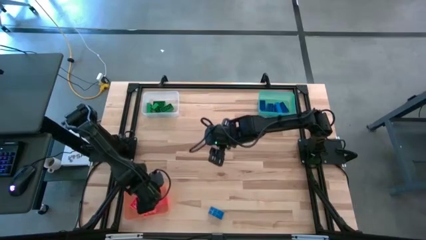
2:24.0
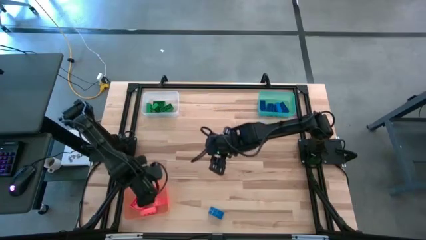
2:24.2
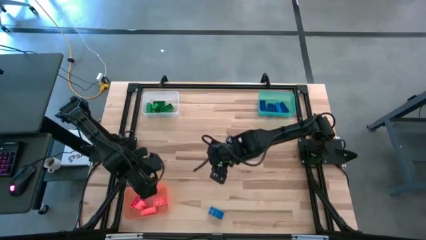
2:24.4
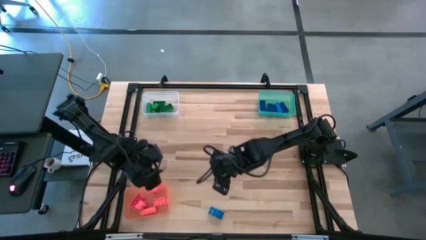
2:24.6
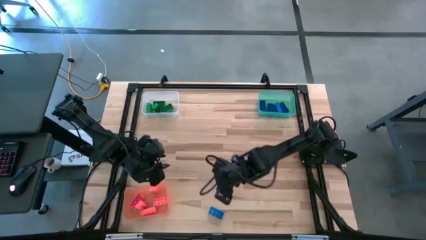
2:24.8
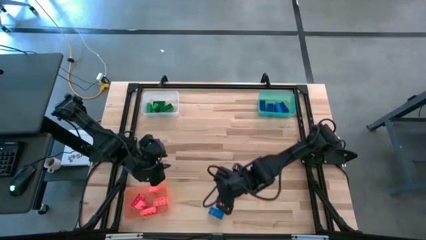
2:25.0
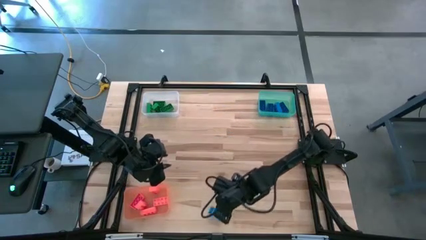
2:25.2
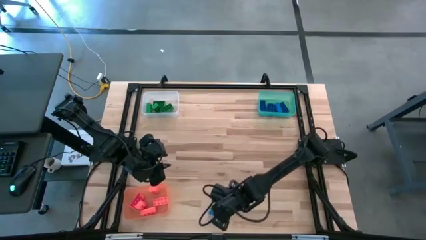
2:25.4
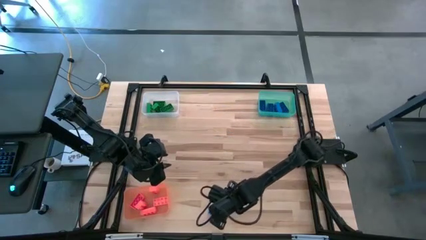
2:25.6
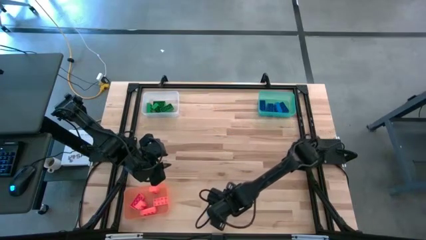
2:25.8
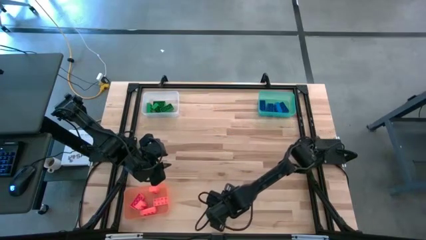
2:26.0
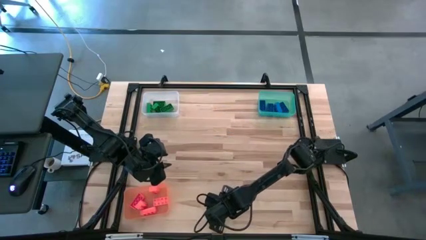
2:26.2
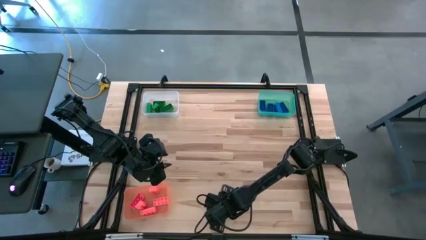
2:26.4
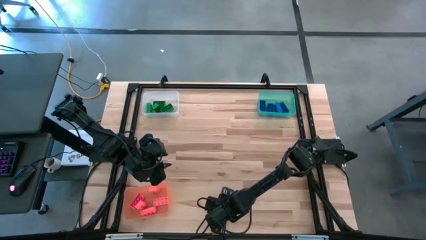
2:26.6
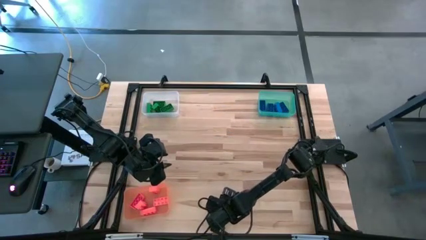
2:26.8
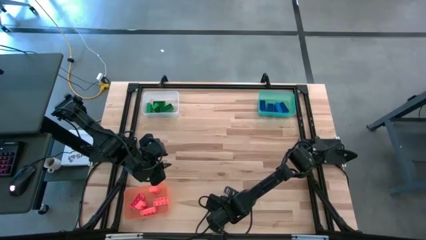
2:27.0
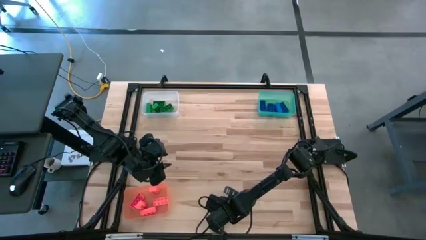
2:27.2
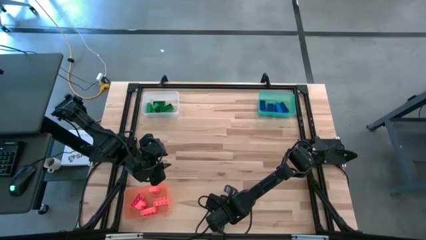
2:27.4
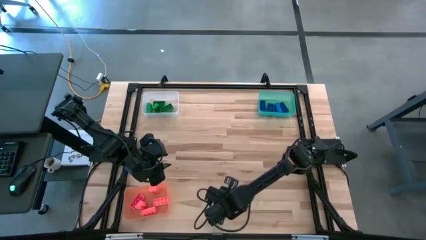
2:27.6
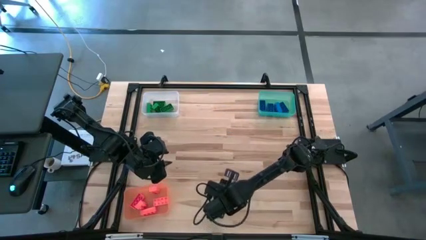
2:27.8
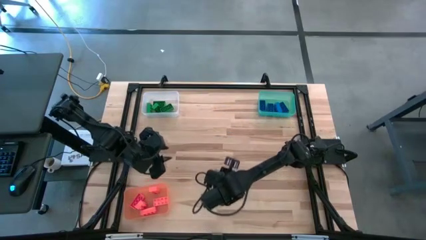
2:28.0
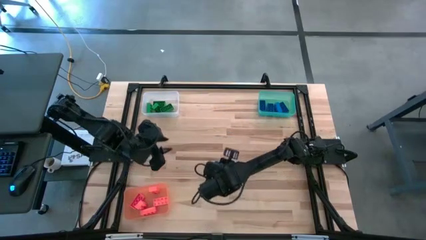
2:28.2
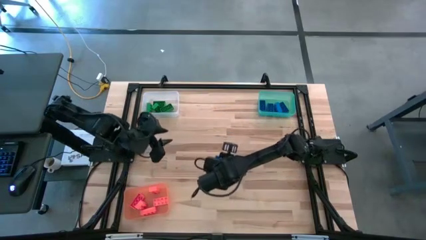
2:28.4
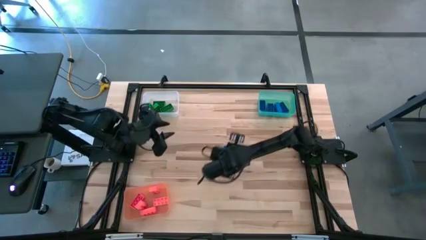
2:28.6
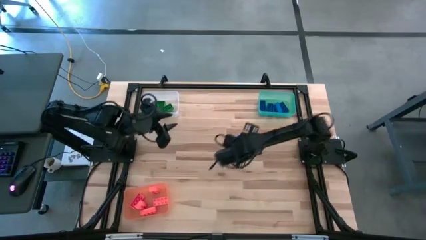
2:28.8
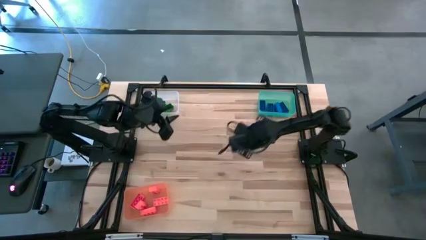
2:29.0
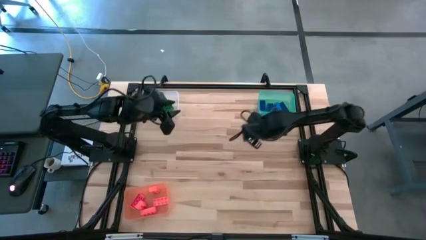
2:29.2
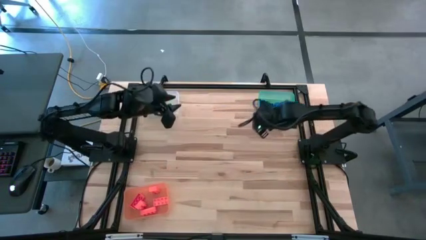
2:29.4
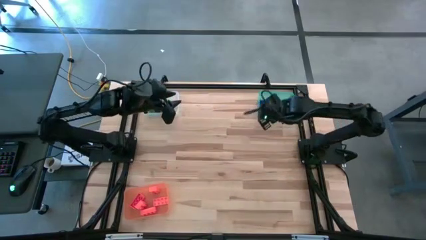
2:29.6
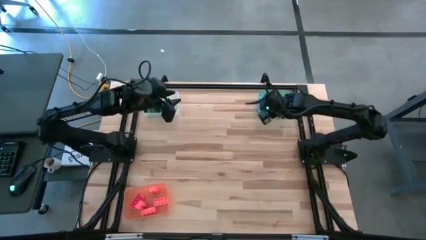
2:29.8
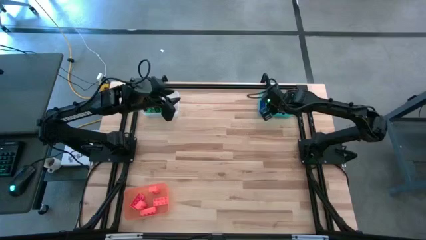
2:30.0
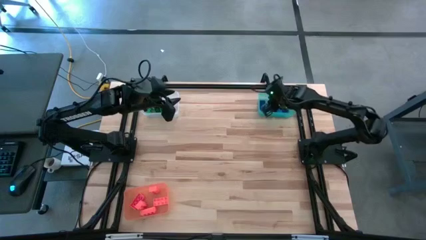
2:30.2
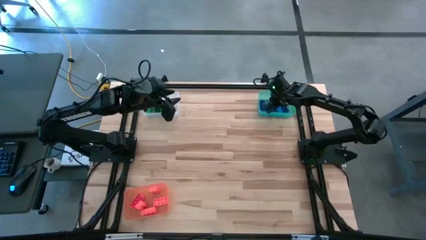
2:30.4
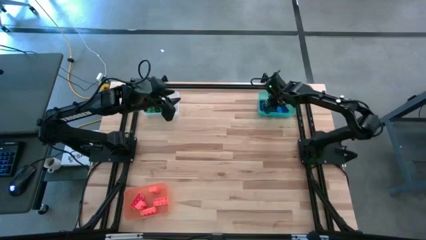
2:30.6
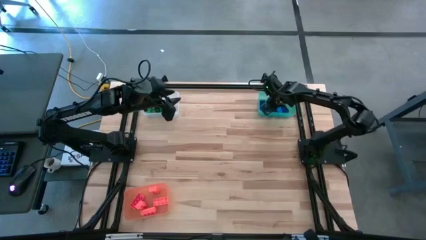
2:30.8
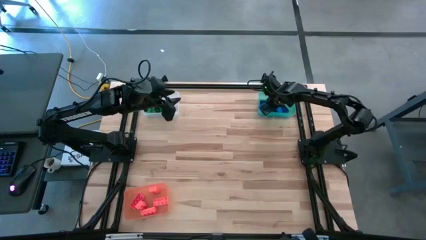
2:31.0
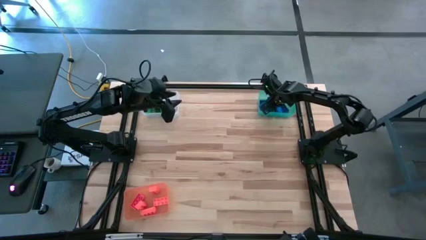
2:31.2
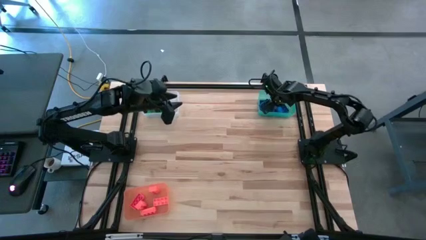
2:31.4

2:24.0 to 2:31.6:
Task: Sort & place blocks by color
Put the blue game piece into the green bin

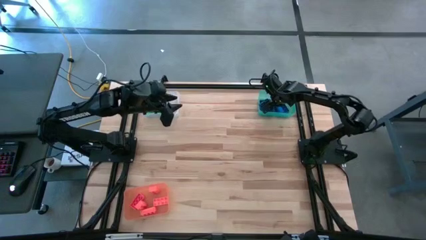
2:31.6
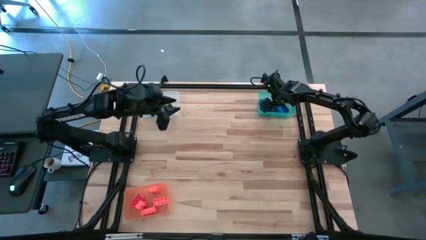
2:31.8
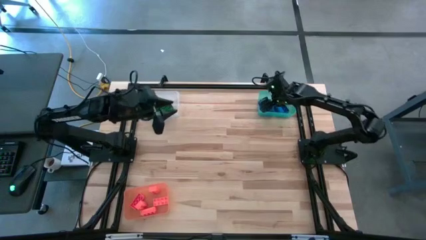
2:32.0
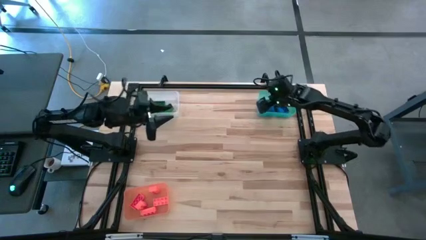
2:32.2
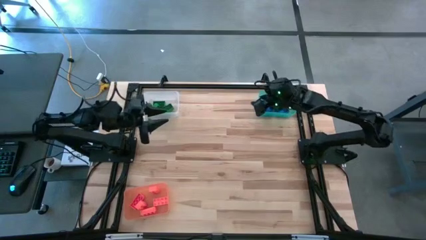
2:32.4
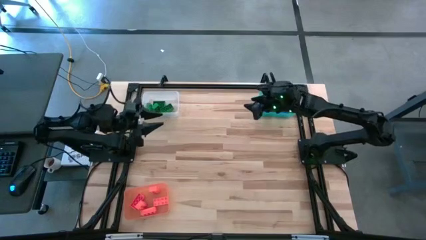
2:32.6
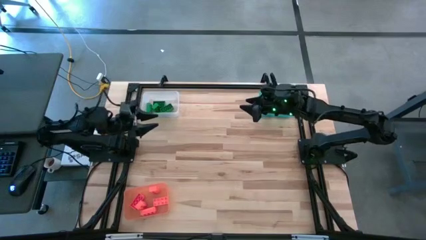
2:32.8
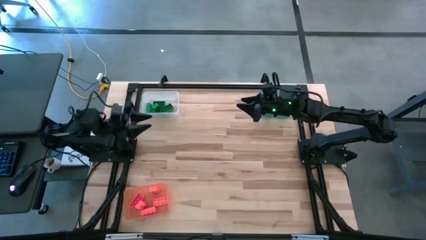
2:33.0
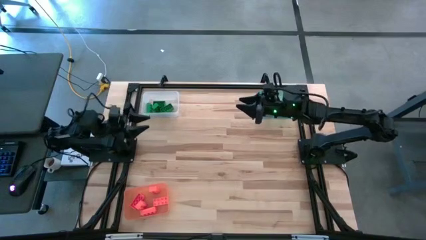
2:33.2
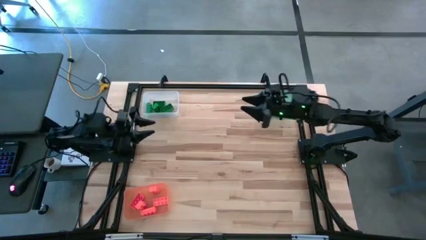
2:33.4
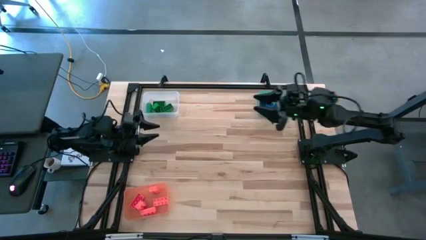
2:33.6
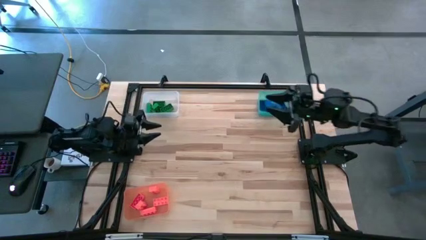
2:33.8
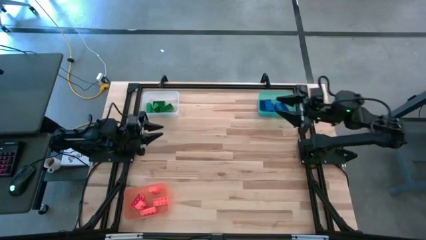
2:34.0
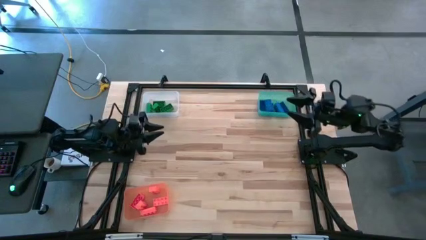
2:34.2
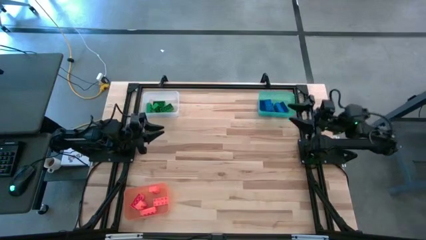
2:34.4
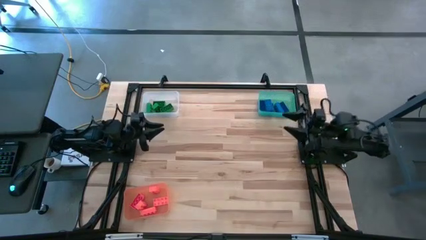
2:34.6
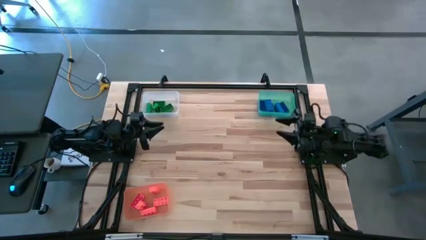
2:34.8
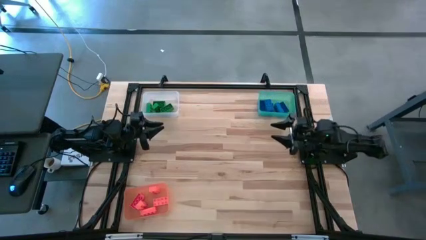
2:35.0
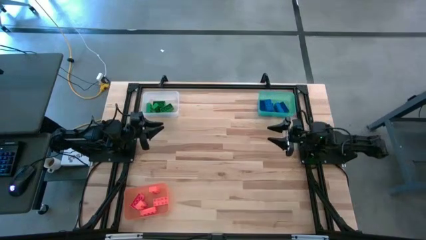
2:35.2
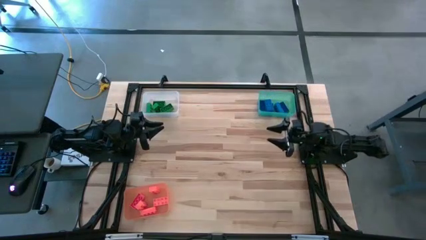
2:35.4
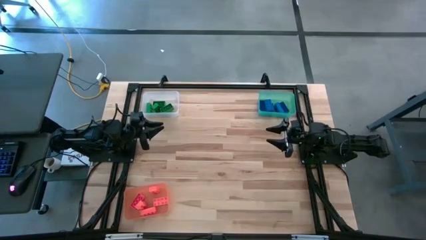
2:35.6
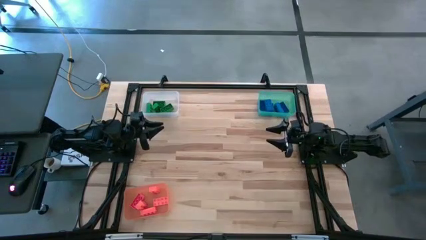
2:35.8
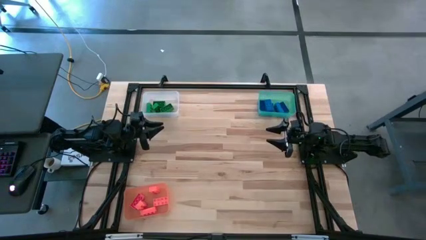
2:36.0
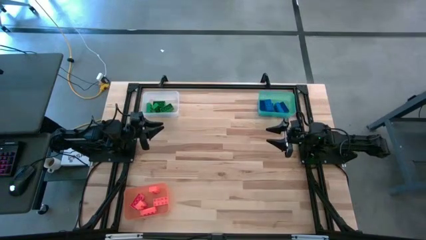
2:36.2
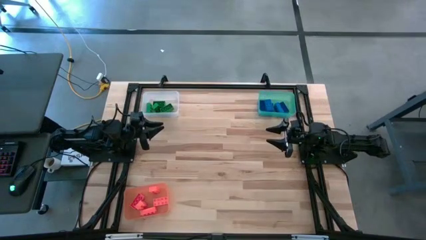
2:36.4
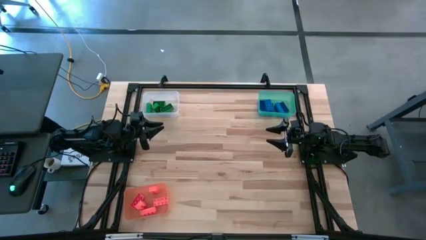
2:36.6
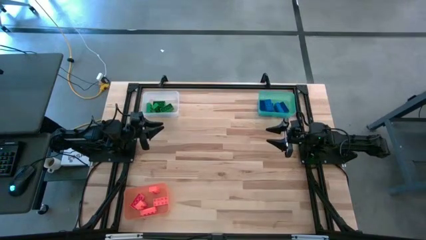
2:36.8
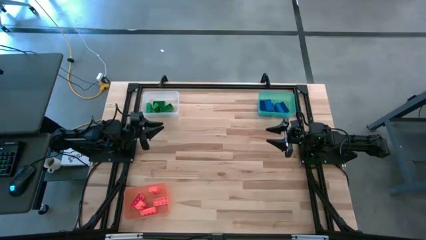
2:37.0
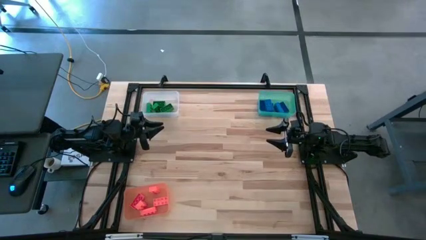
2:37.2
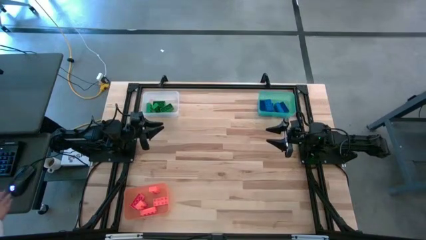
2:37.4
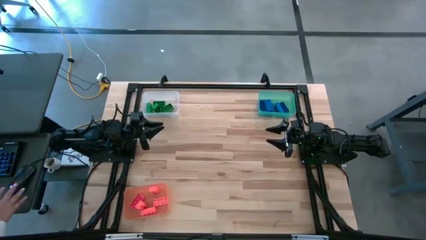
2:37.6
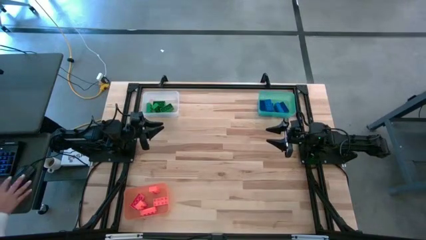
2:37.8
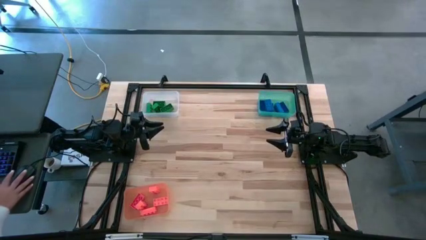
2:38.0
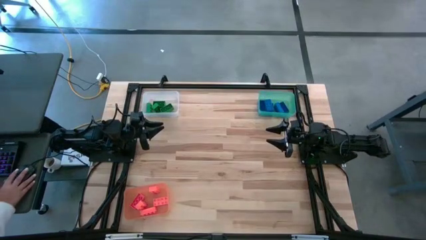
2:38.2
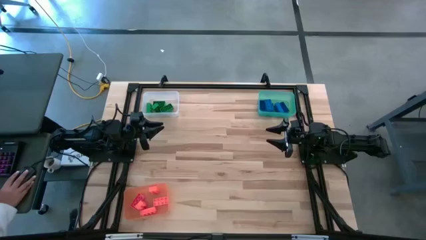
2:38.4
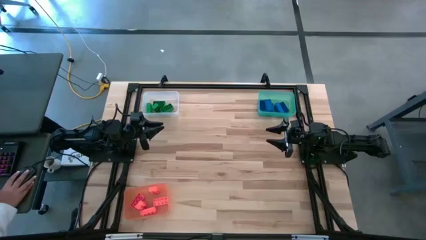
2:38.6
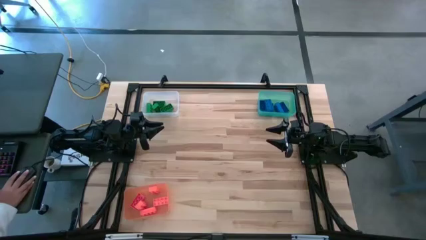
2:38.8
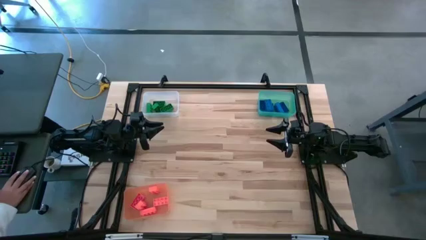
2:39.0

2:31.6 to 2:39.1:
Return to Home Position
